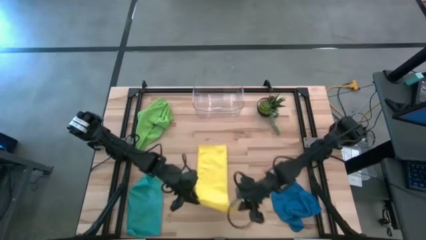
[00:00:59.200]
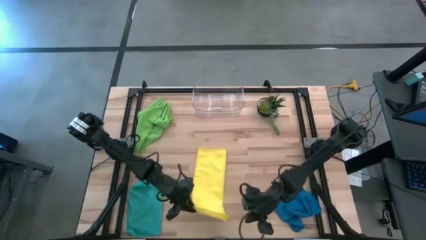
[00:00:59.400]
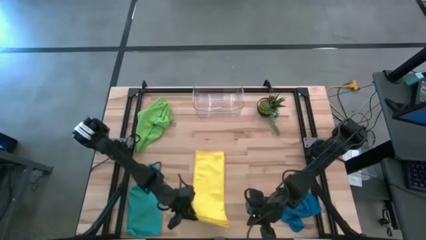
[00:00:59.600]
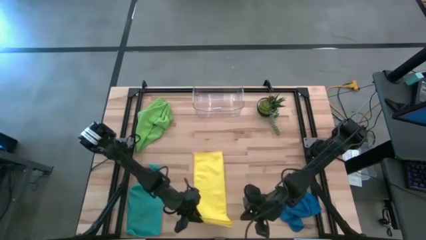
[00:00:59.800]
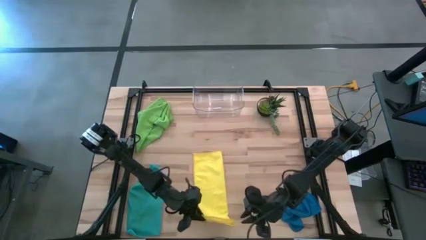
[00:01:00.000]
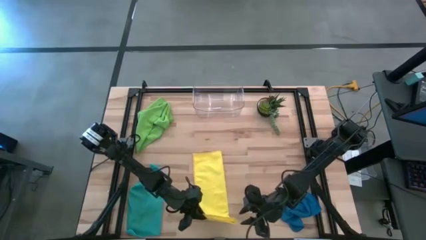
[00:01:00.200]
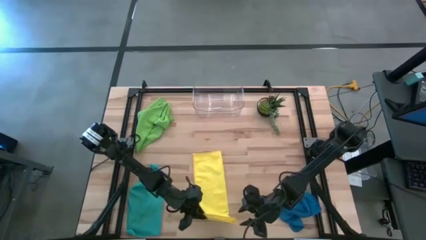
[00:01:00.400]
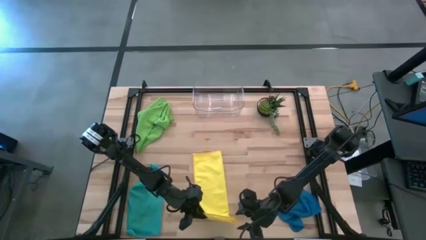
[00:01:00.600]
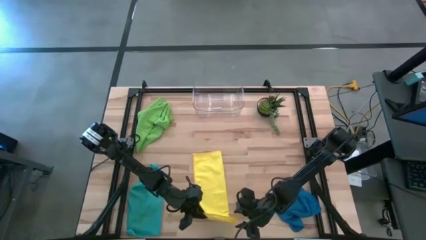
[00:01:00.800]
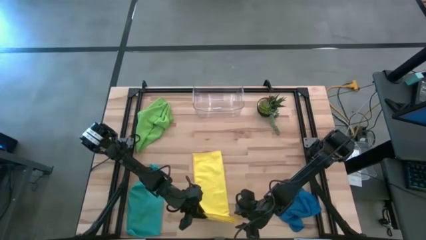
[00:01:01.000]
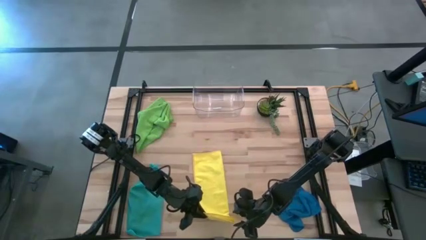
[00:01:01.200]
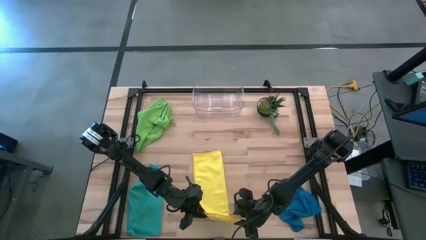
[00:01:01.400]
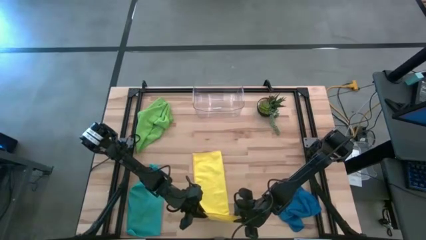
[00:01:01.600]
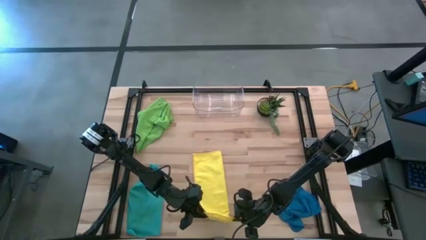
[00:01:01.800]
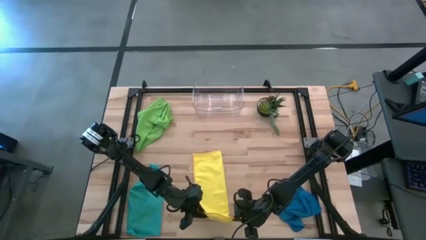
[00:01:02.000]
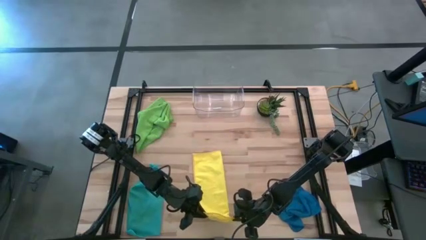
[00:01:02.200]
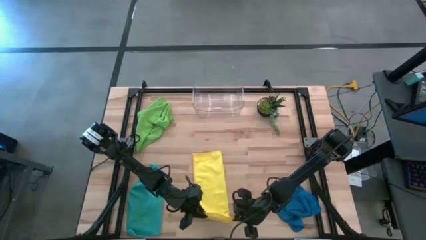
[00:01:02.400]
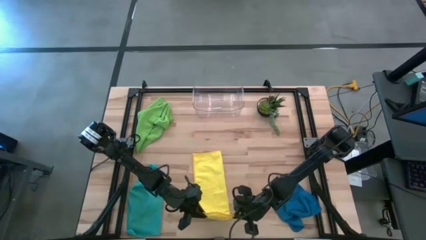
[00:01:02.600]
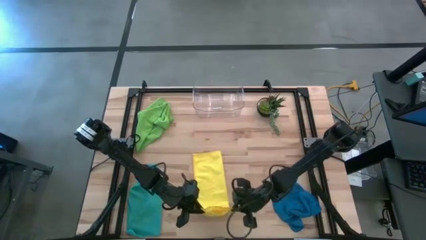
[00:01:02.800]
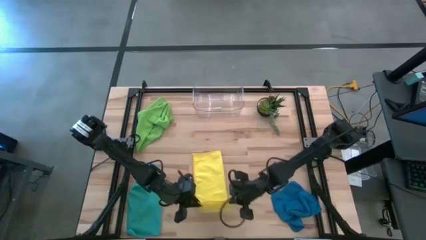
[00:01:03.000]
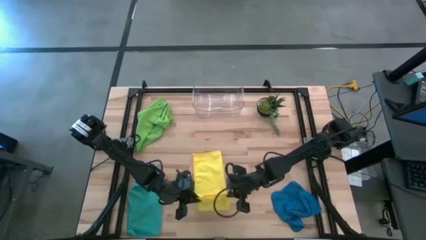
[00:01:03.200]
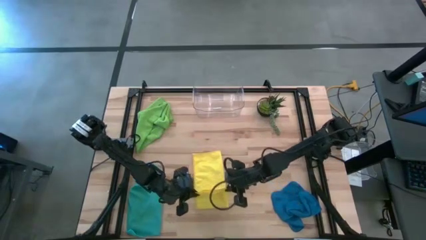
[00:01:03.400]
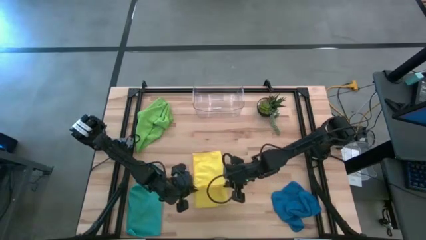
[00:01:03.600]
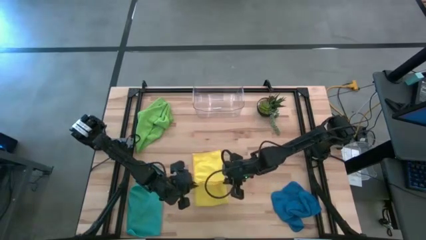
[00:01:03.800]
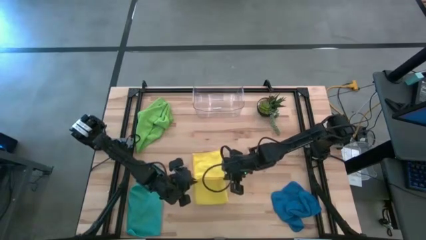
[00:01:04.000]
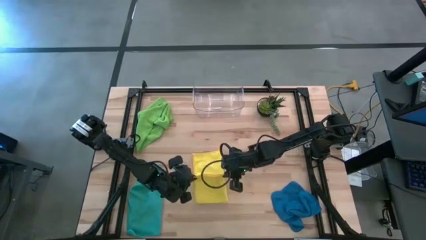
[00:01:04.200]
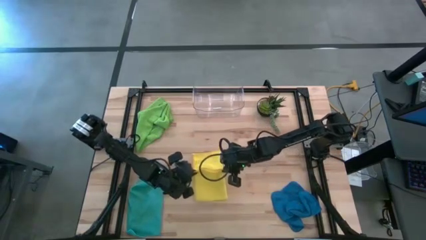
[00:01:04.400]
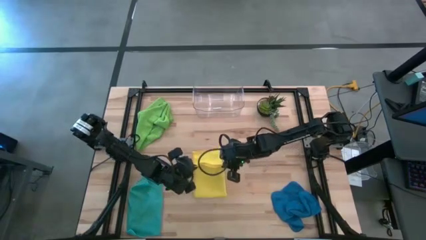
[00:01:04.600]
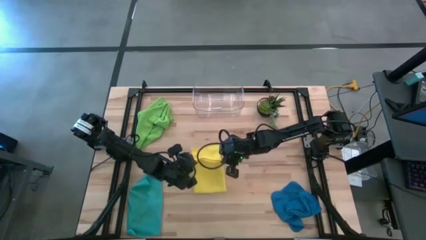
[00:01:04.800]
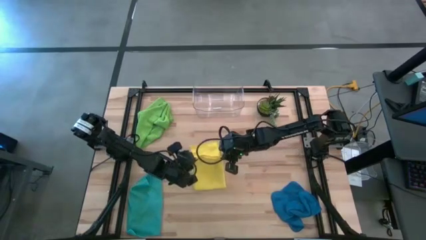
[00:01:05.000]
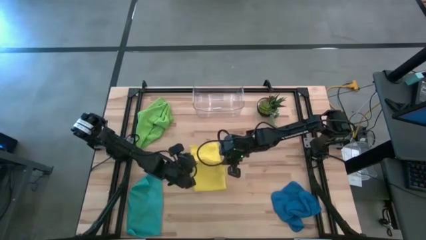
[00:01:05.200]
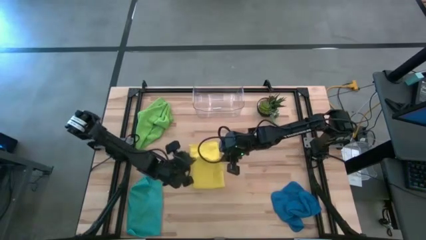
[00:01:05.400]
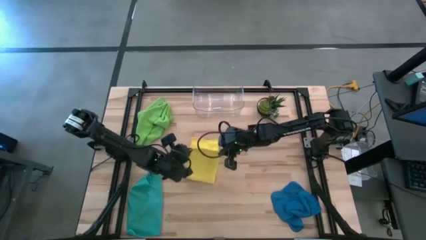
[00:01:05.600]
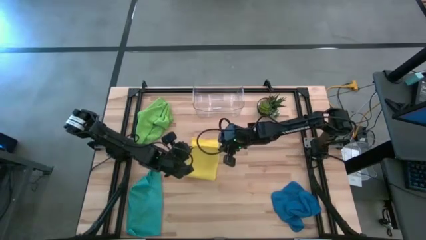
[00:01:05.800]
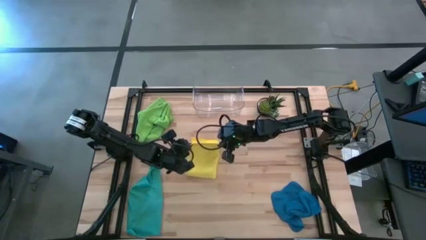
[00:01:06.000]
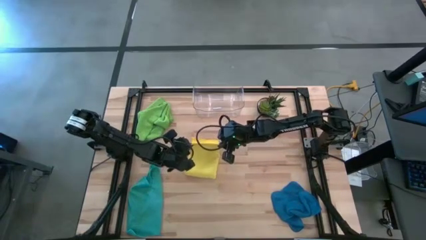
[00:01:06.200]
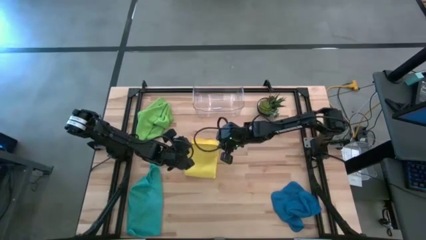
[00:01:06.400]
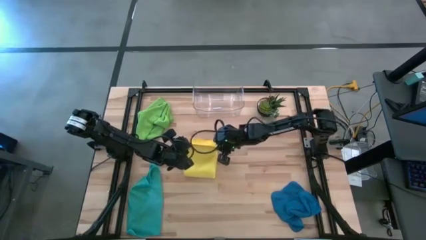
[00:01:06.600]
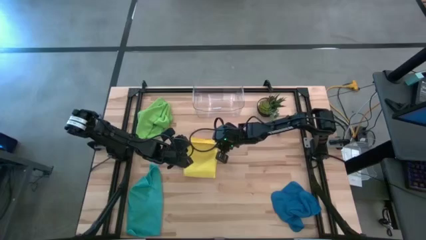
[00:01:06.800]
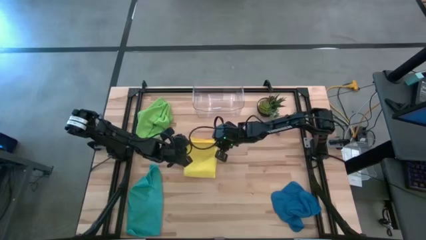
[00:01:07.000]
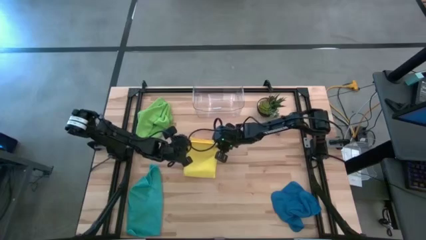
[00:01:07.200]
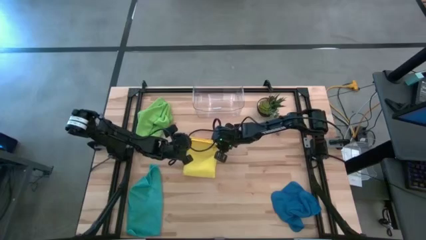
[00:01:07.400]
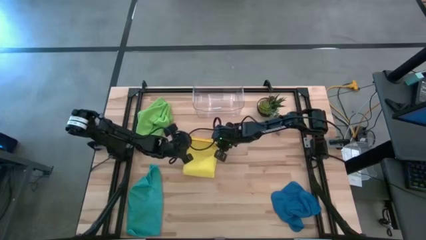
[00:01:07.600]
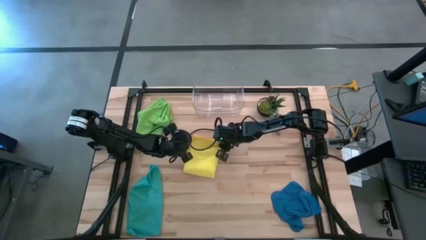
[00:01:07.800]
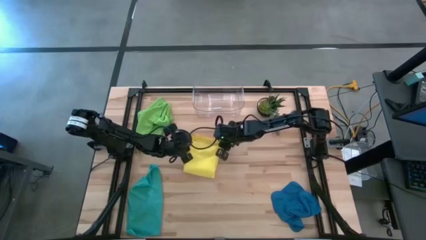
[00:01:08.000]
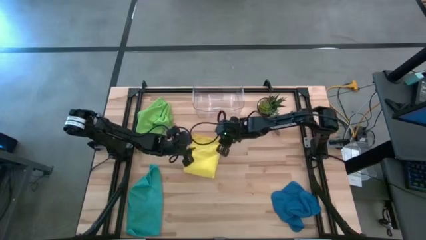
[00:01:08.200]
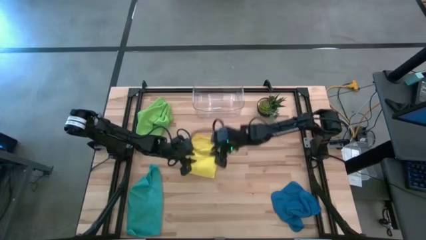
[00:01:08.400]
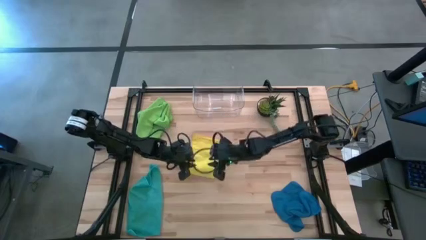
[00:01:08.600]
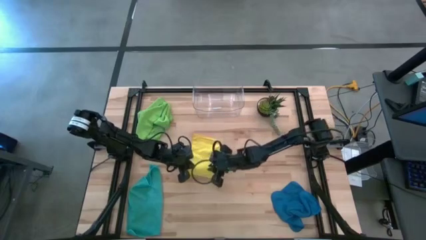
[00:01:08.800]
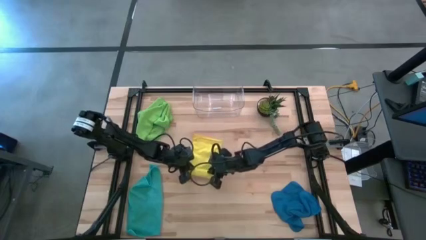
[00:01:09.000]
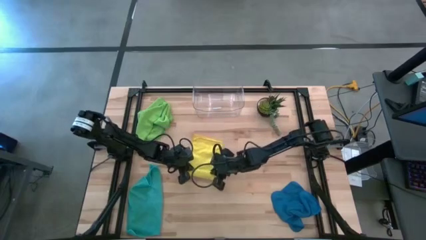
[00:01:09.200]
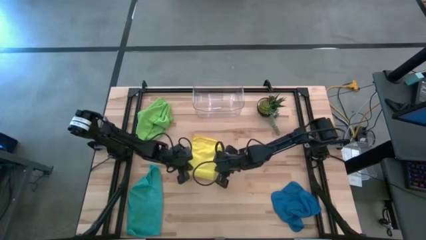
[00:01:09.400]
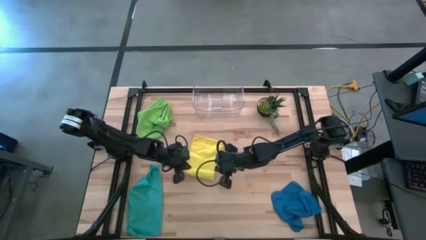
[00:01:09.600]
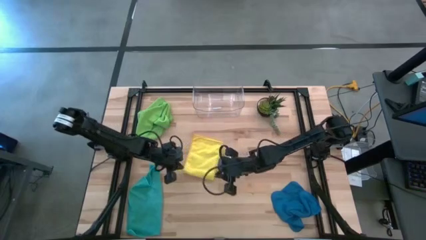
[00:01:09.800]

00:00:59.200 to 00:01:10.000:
Task: Fold microfiber towels
Fold the yellow microfiber towel
